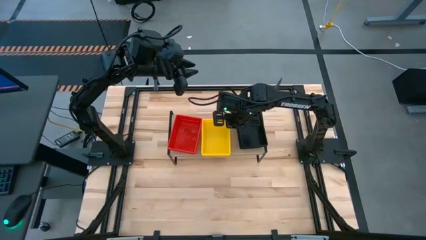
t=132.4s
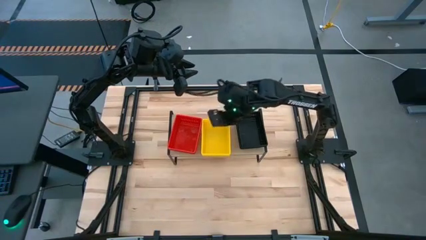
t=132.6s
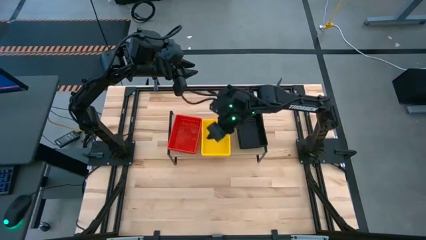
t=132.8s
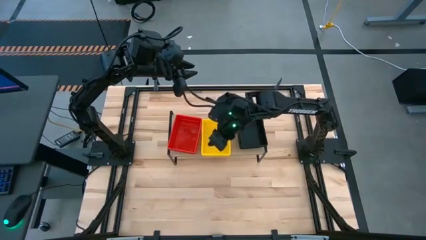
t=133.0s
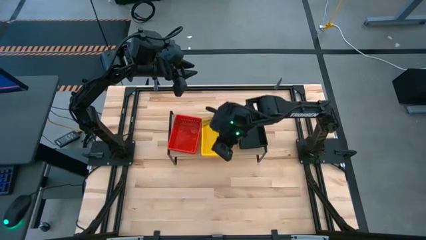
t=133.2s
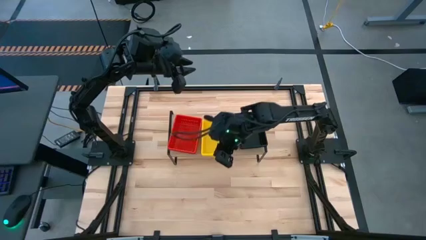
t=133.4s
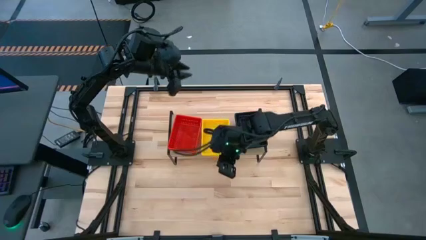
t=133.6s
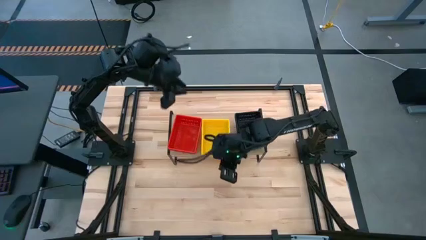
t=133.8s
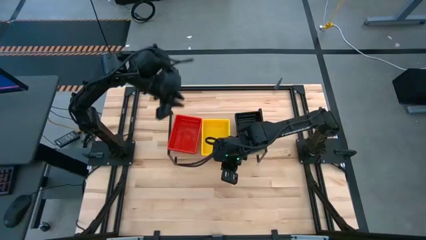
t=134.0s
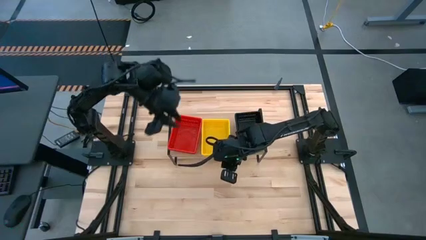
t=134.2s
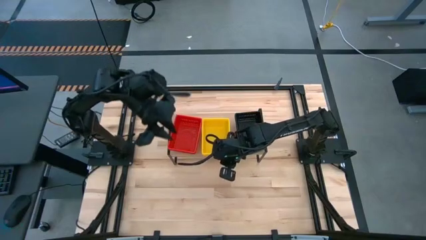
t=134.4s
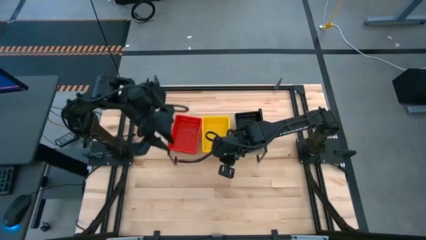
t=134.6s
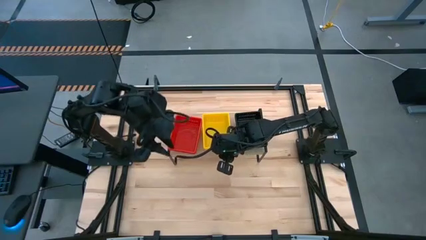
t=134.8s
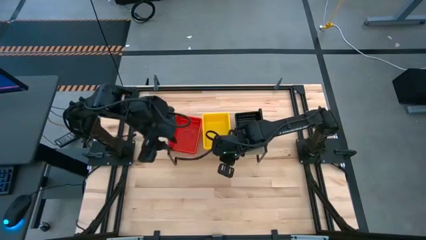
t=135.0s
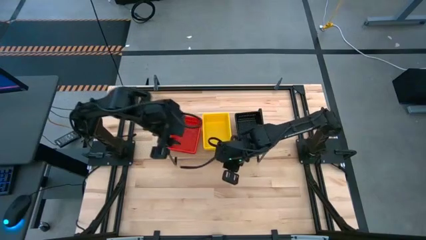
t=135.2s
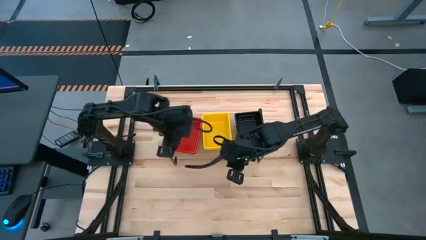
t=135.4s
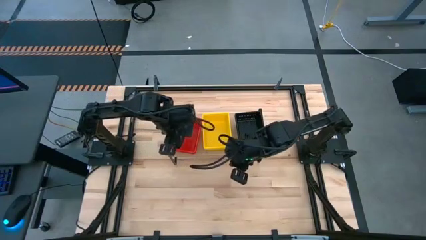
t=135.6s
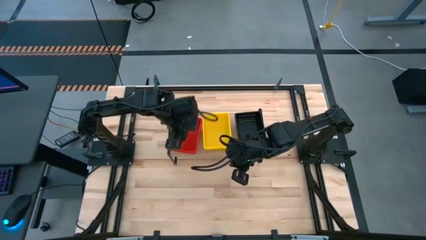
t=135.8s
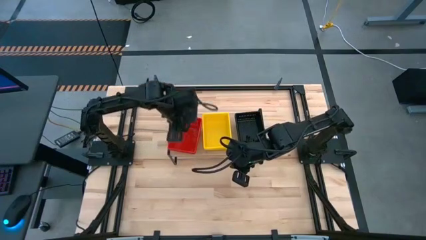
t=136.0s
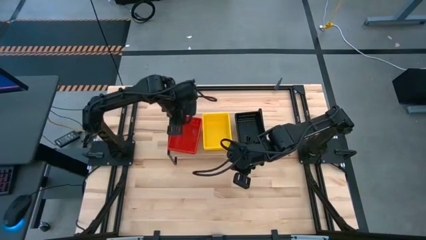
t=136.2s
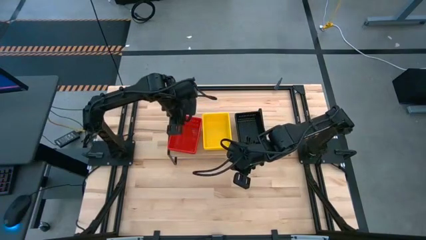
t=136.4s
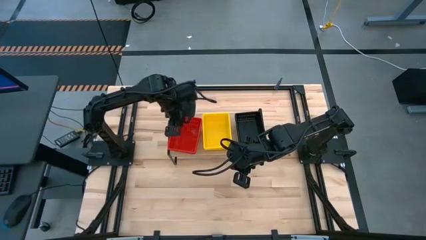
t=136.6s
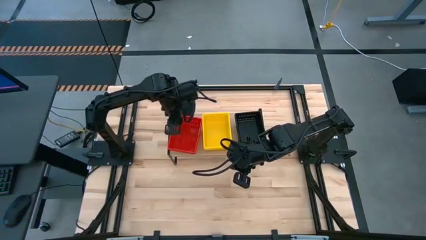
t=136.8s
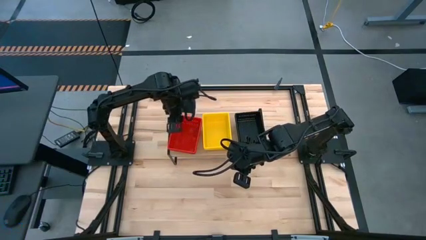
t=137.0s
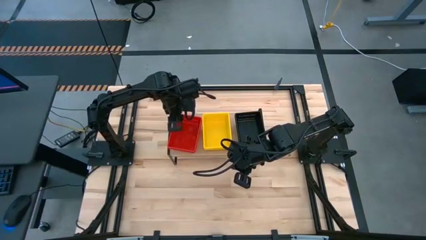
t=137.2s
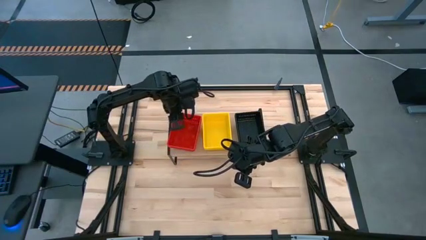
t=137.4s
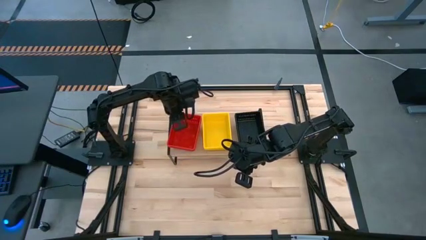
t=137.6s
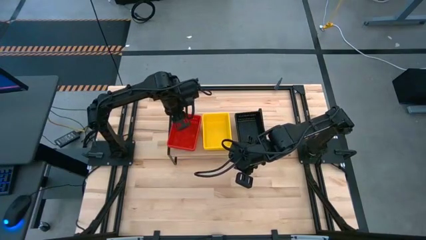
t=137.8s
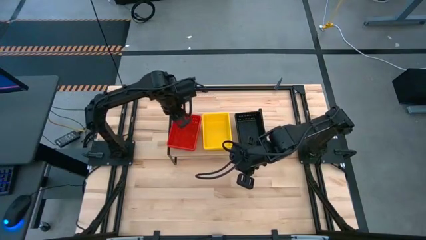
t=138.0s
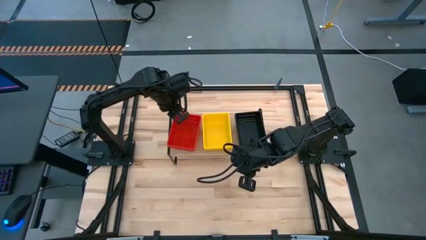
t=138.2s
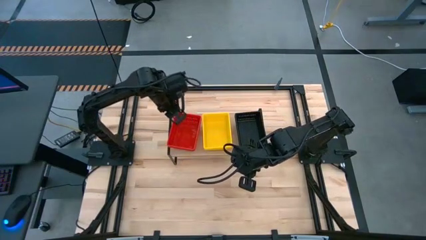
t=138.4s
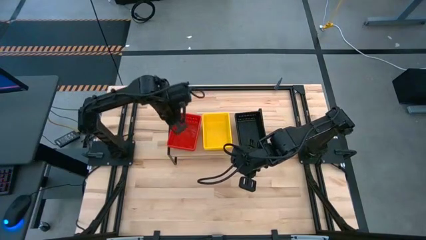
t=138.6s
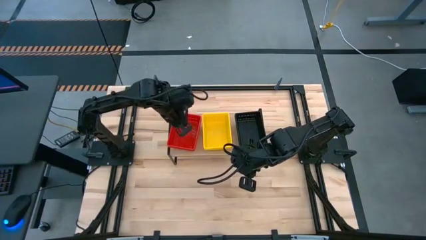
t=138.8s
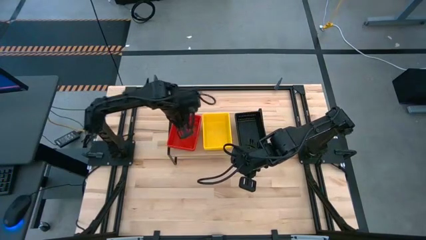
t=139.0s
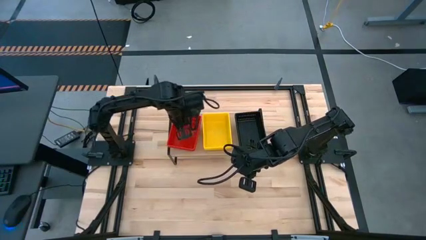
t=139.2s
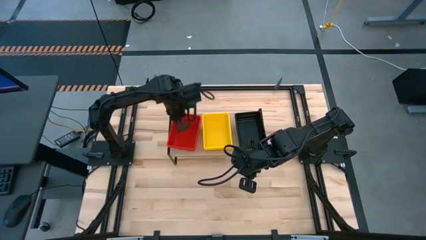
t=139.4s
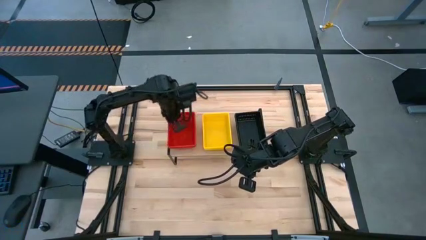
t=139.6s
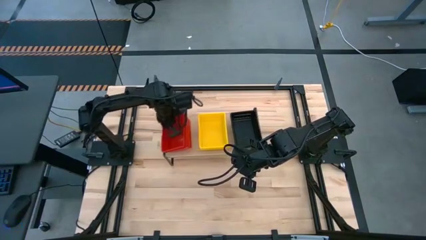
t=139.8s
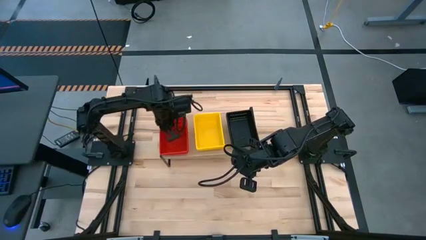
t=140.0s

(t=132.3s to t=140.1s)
Task: Stack baskets on shelf by color
Adjust the bins

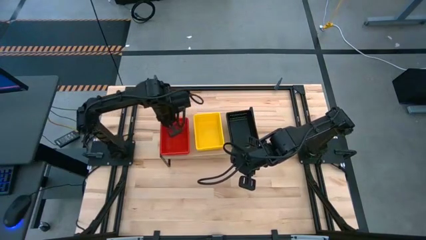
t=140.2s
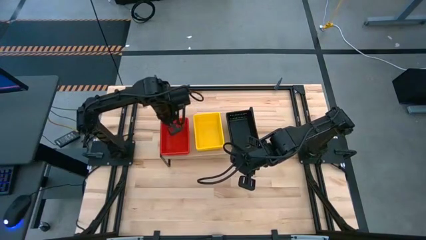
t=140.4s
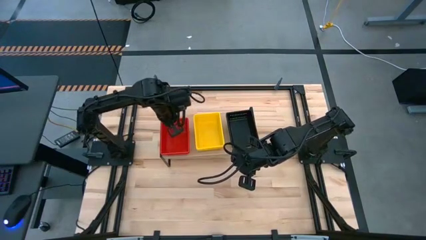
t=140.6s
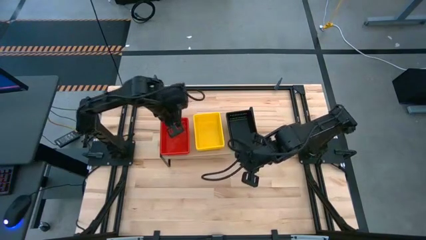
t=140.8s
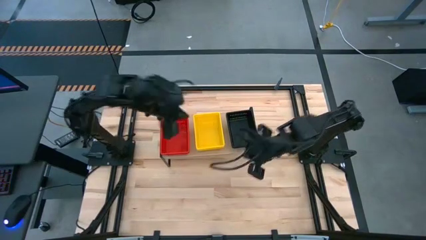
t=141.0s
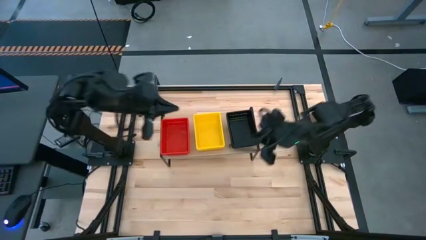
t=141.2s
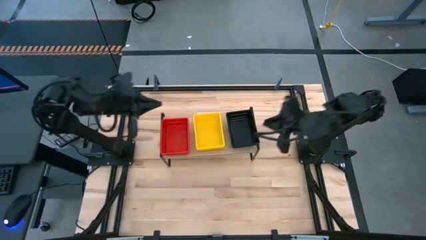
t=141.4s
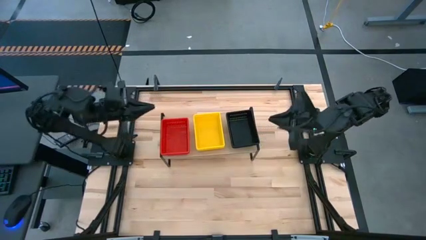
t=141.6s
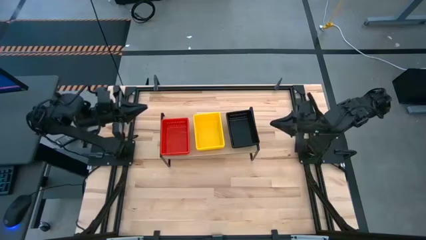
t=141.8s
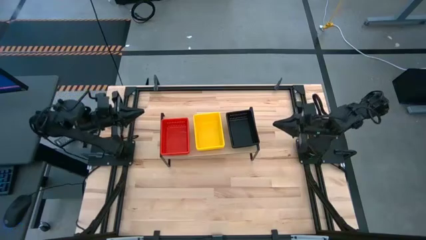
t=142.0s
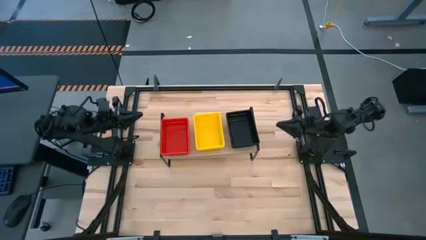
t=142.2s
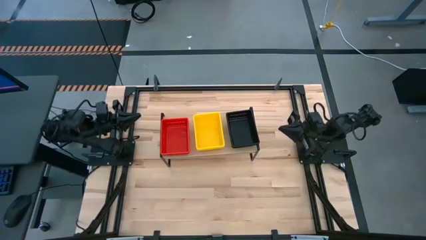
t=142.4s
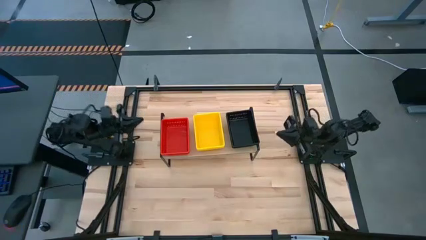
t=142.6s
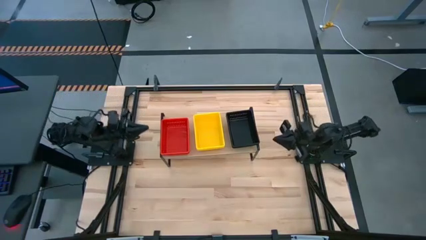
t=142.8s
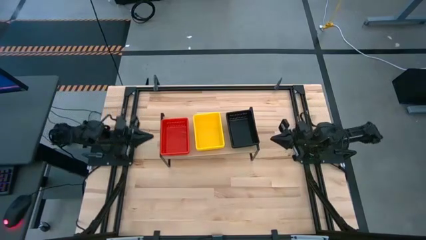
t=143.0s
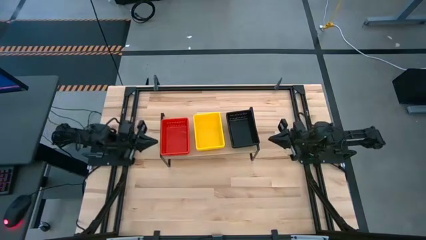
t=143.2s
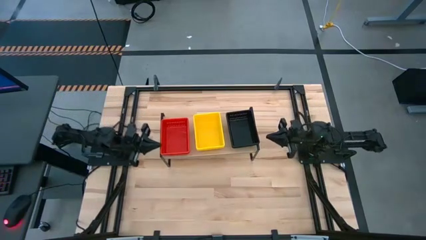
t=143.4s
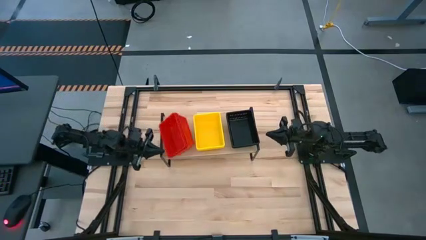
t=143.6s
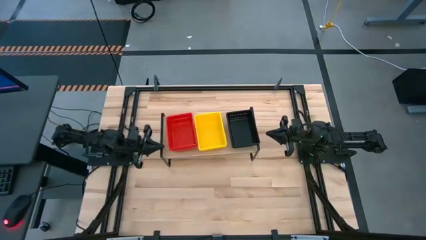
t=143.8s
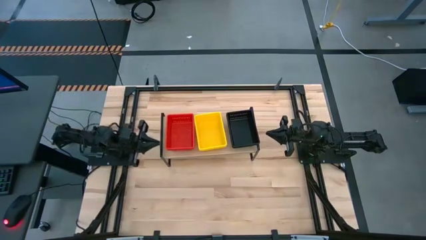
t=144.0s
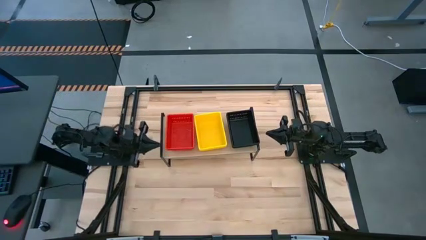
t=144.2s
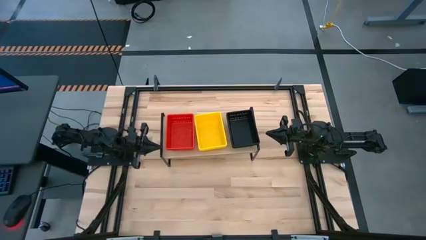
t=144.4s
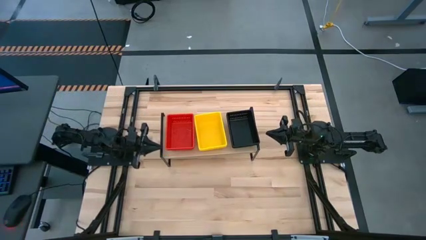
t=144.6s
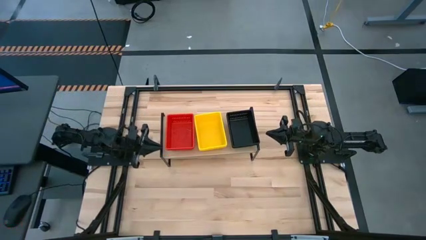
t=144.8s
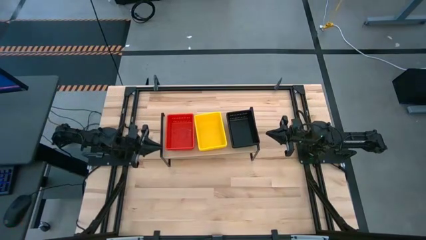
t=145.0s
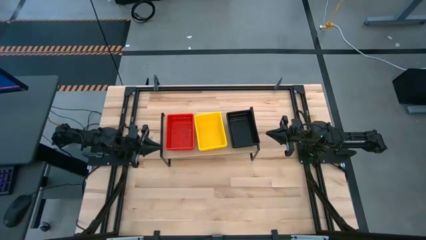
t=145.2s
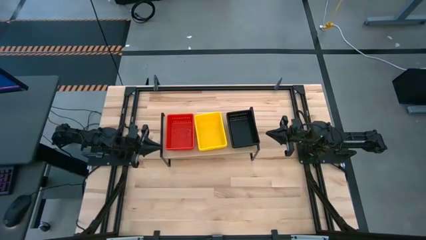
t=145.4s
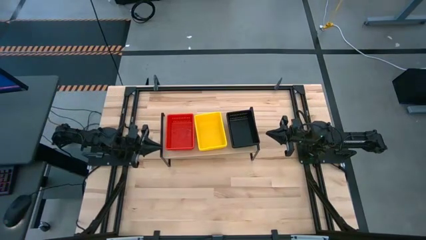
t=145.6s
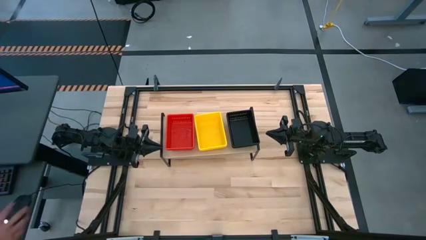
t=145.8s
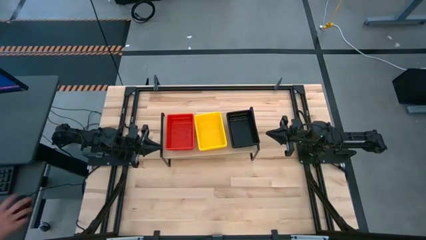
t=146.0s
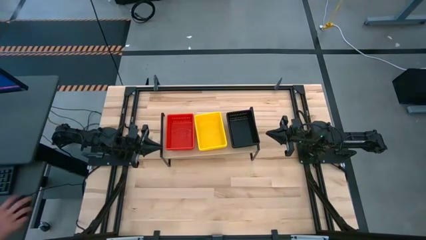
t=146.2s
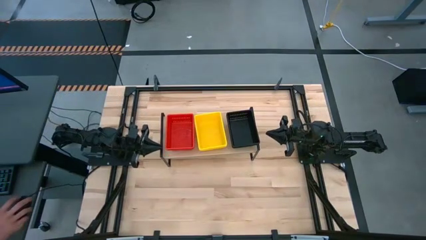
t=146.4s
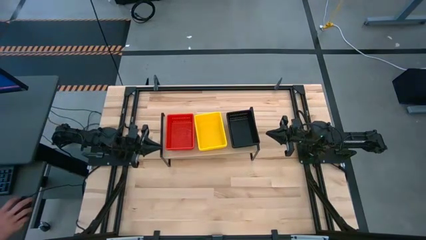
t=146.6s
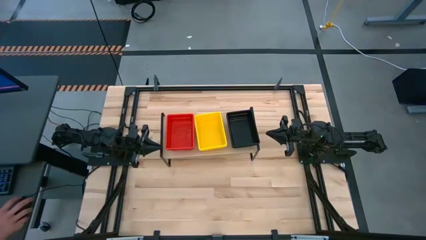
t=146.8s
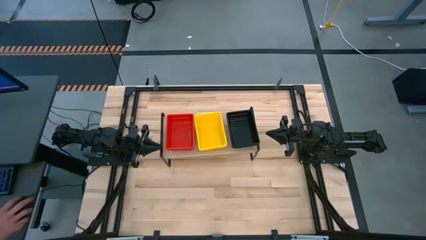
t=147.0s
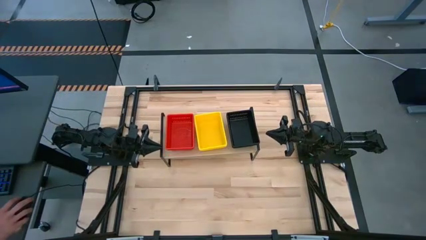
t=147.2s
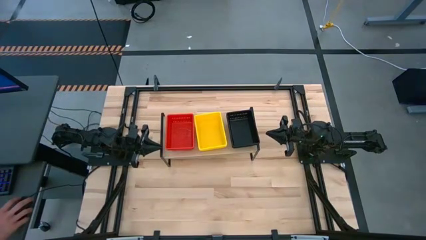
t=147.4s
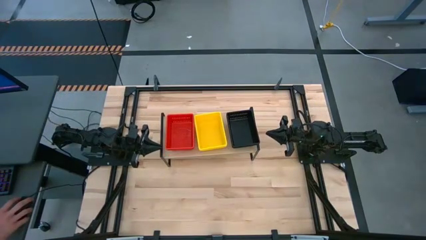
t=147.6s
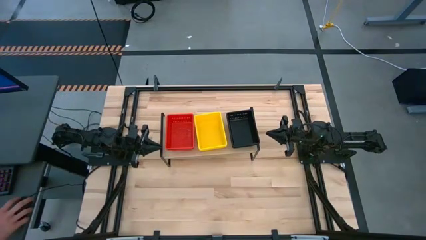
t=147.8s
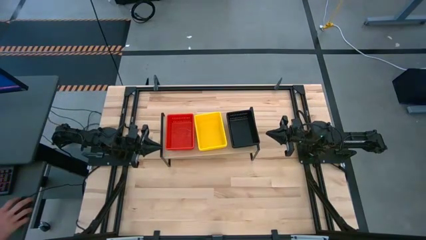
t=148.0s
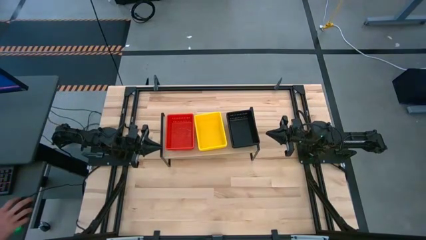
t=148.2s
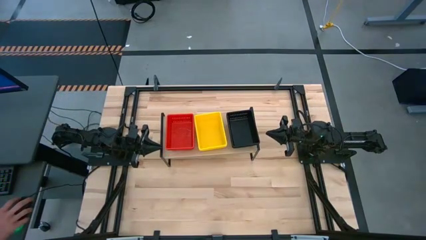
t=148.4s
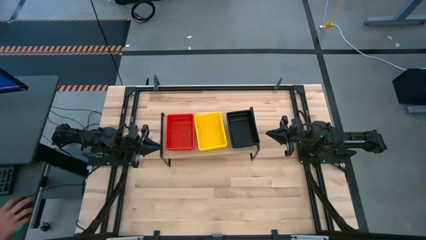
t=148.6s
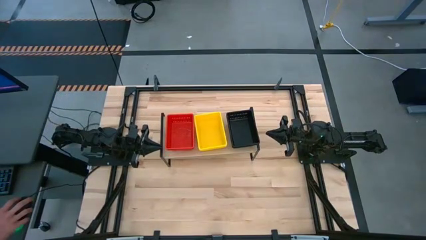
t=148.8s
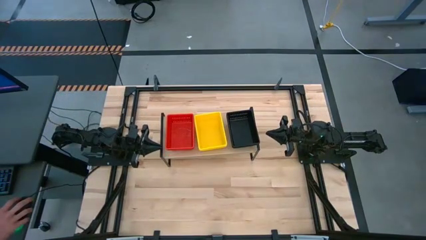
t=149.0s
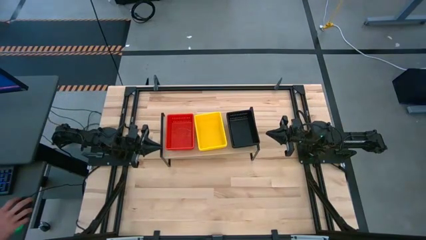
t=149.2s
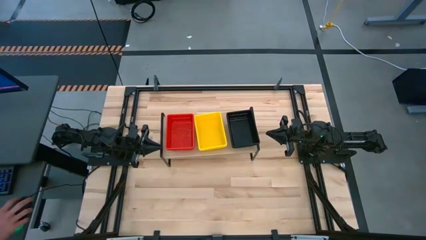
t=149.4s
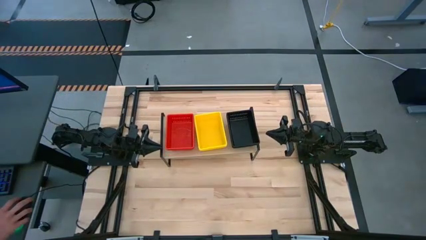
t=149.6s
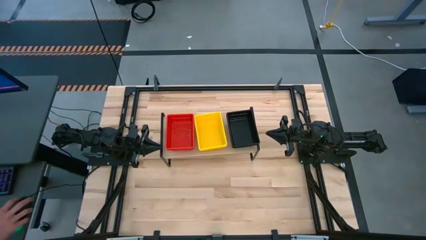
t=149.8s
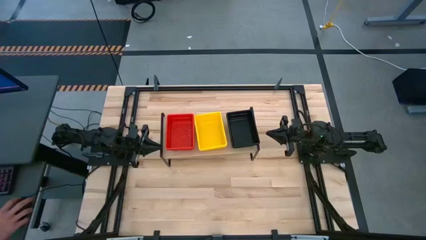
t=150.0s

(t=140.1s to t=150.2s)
Return to Home Position
